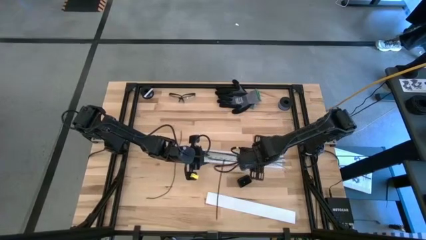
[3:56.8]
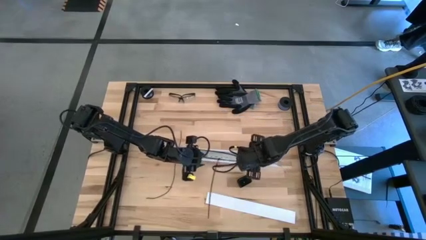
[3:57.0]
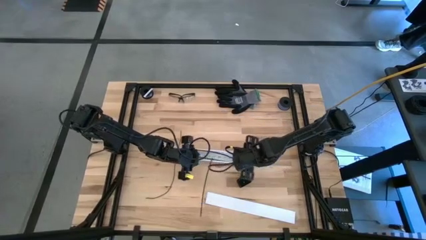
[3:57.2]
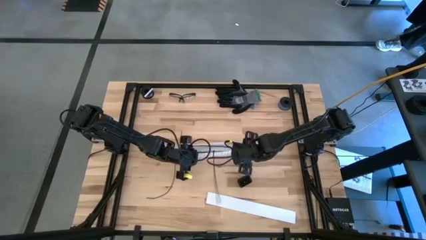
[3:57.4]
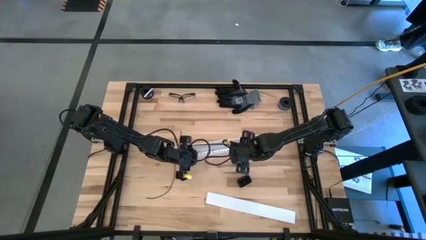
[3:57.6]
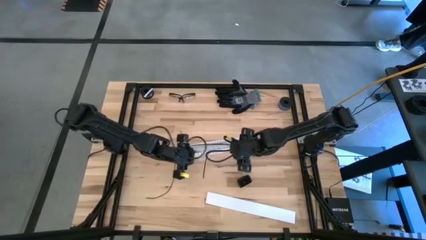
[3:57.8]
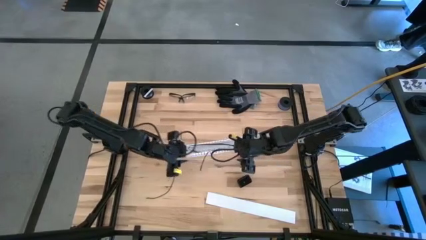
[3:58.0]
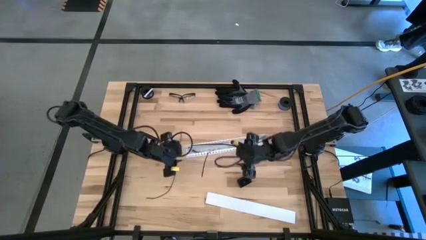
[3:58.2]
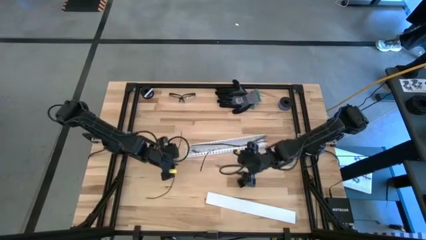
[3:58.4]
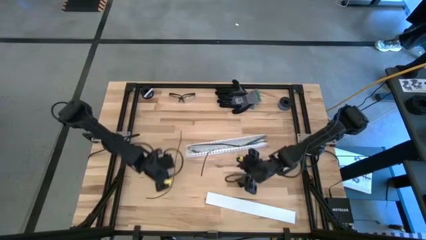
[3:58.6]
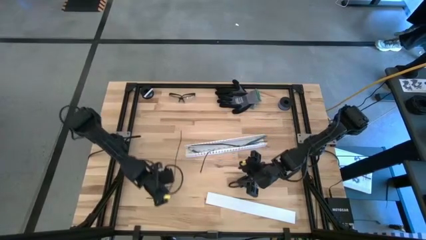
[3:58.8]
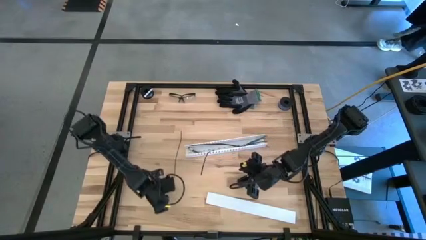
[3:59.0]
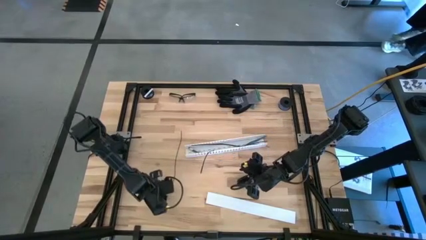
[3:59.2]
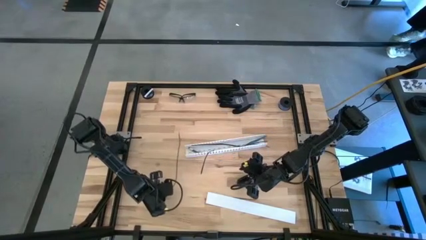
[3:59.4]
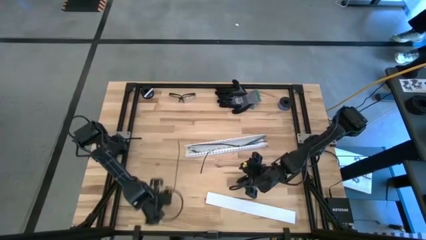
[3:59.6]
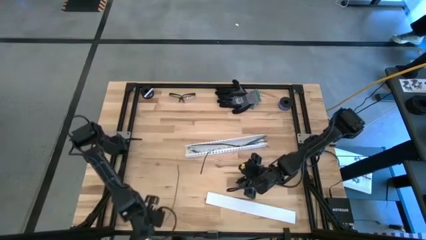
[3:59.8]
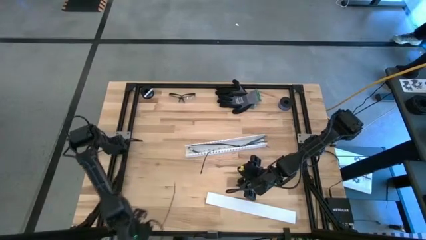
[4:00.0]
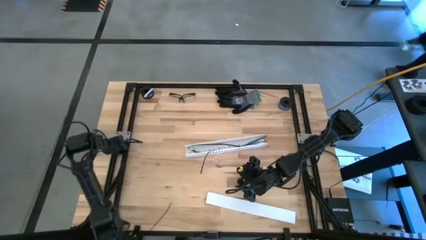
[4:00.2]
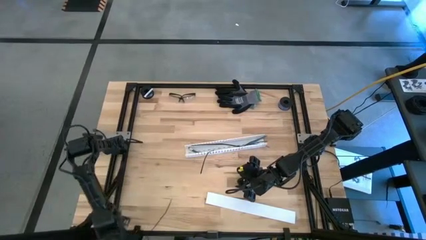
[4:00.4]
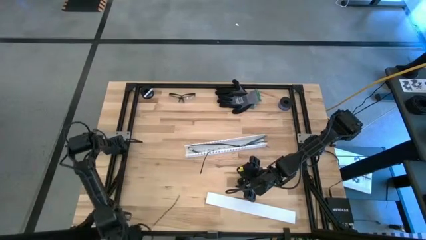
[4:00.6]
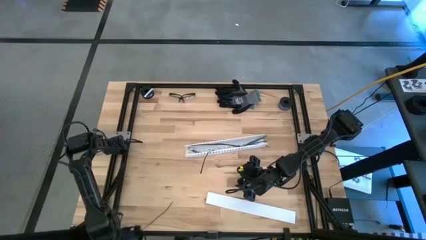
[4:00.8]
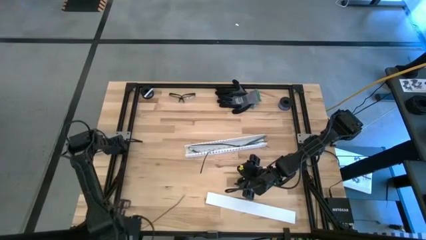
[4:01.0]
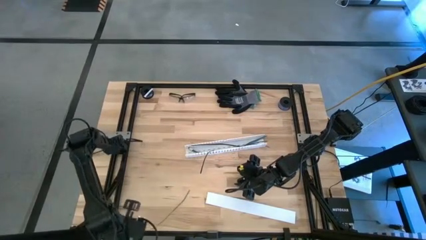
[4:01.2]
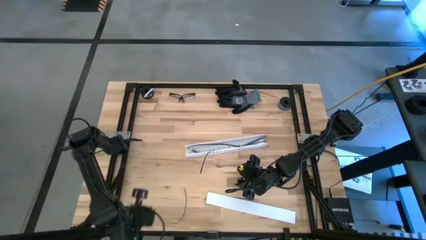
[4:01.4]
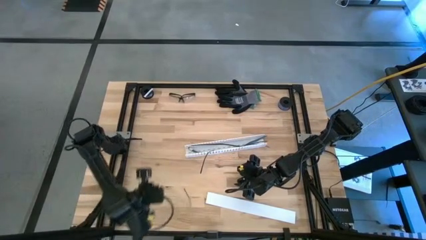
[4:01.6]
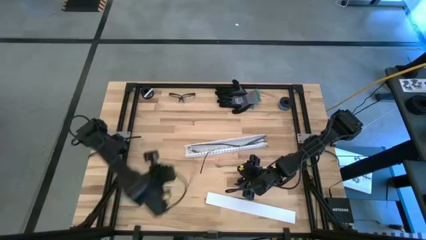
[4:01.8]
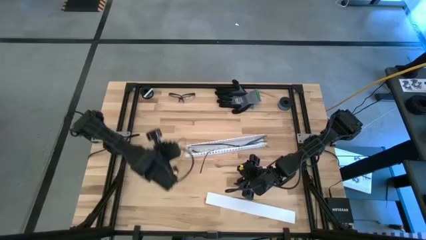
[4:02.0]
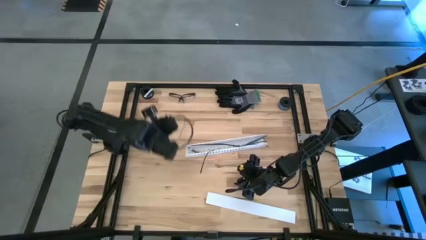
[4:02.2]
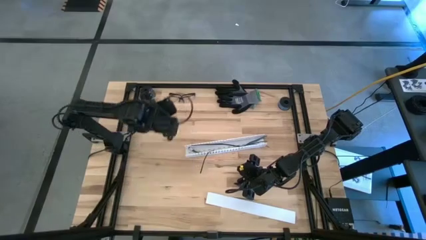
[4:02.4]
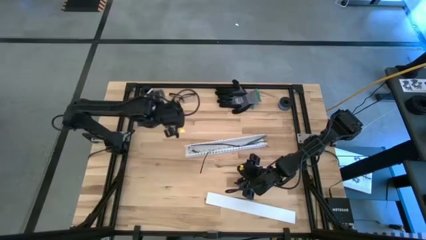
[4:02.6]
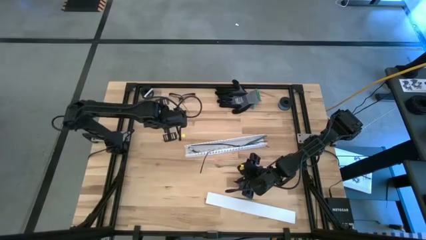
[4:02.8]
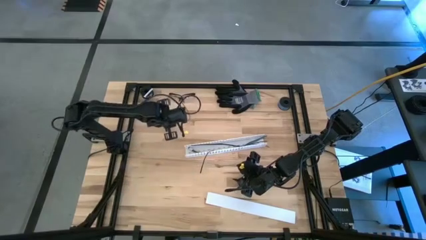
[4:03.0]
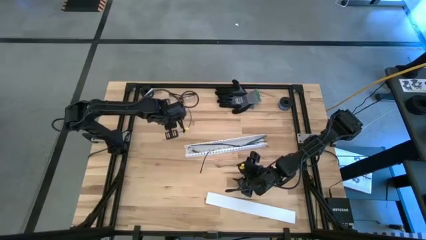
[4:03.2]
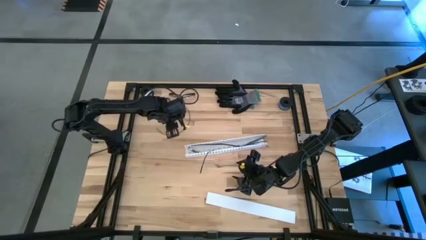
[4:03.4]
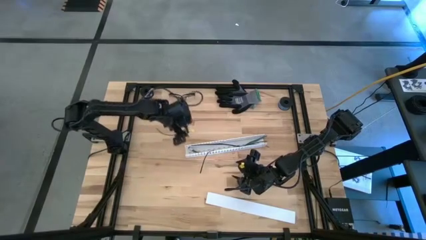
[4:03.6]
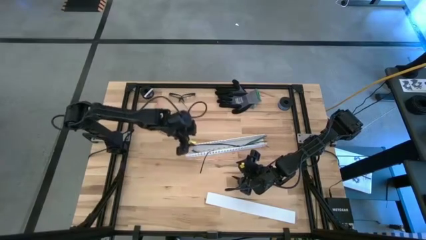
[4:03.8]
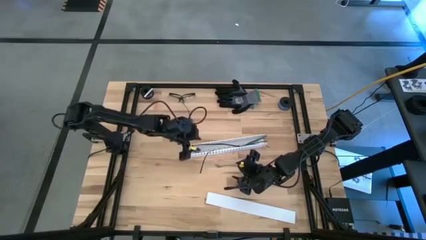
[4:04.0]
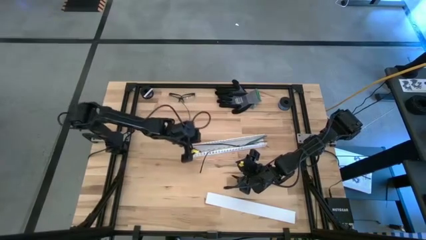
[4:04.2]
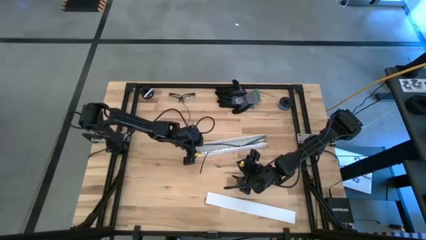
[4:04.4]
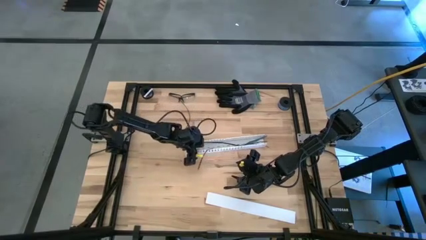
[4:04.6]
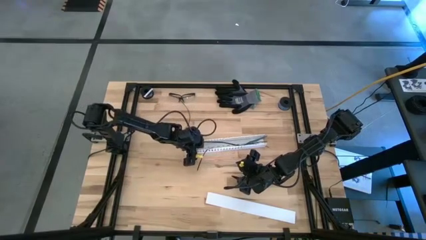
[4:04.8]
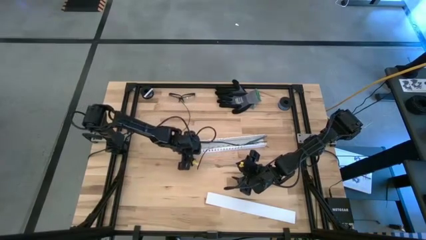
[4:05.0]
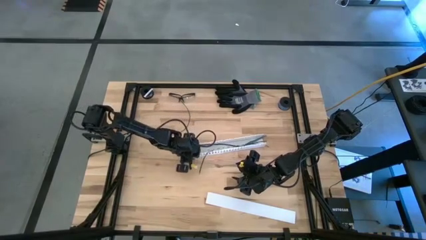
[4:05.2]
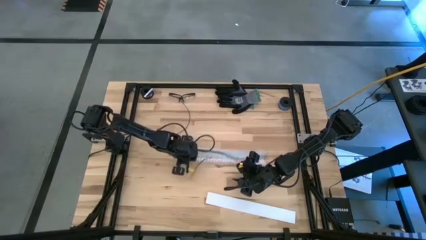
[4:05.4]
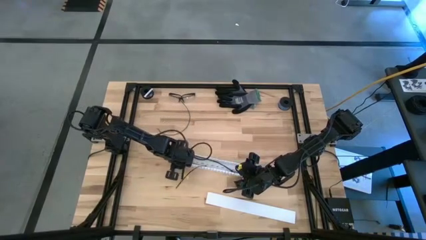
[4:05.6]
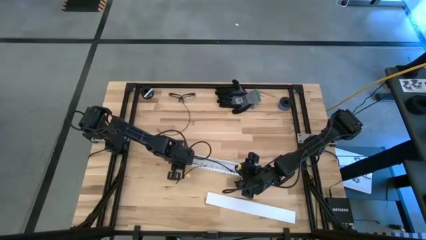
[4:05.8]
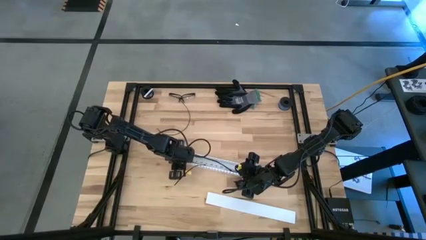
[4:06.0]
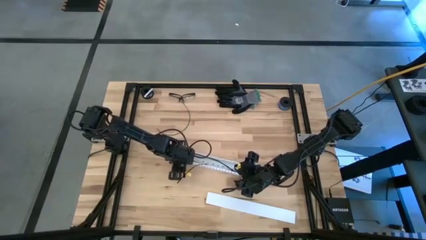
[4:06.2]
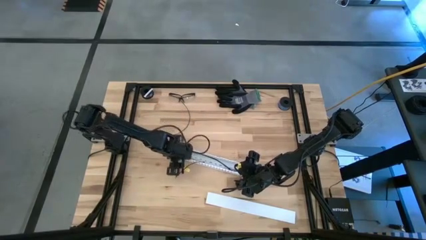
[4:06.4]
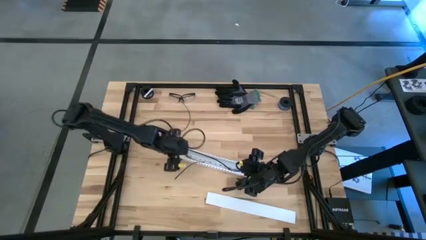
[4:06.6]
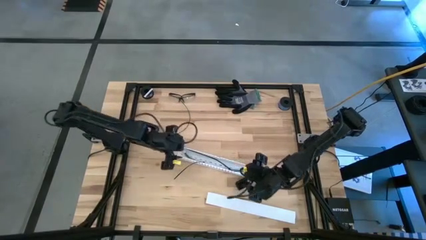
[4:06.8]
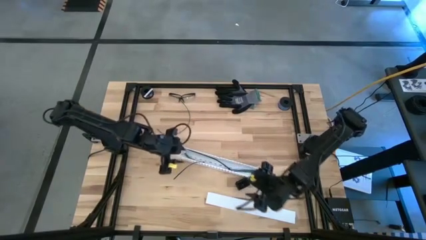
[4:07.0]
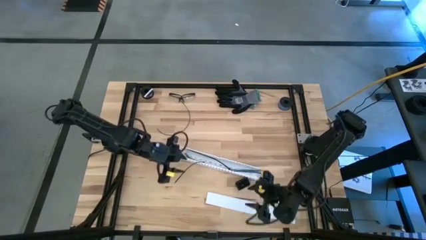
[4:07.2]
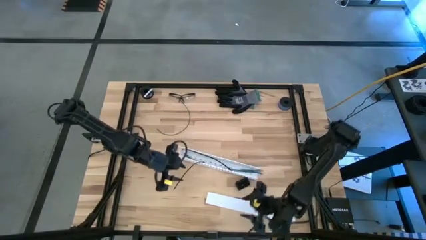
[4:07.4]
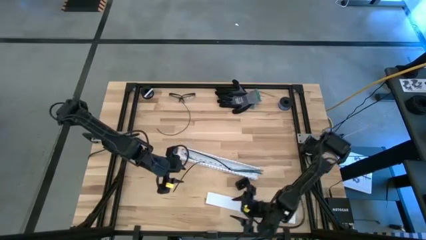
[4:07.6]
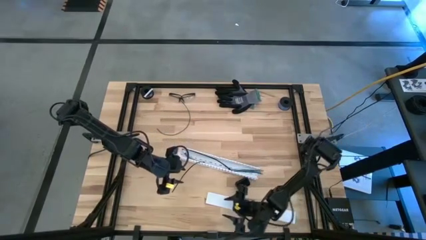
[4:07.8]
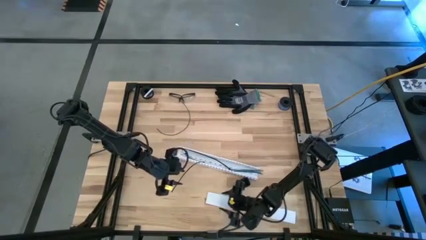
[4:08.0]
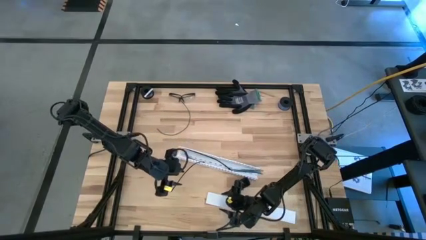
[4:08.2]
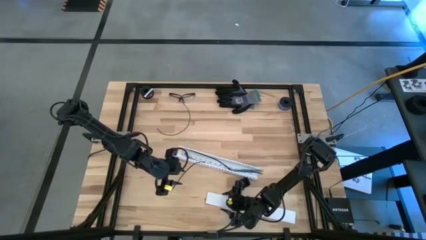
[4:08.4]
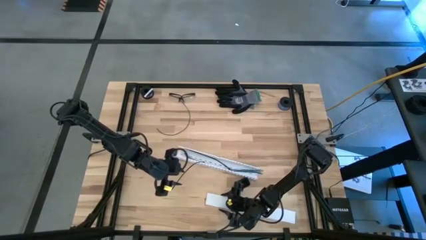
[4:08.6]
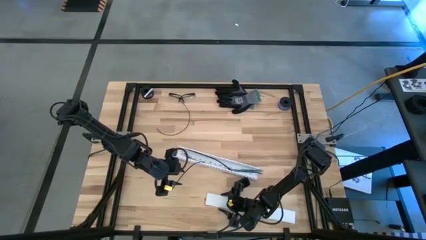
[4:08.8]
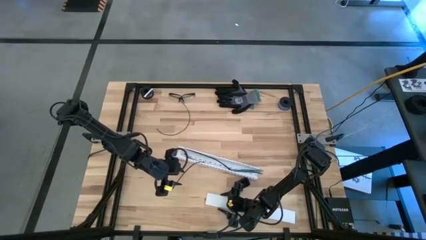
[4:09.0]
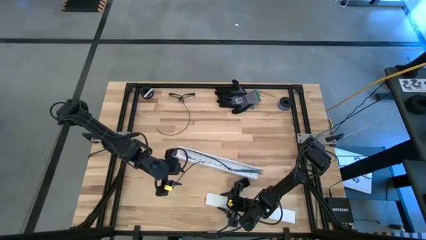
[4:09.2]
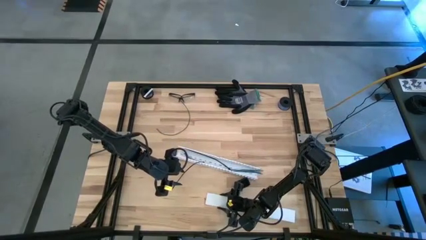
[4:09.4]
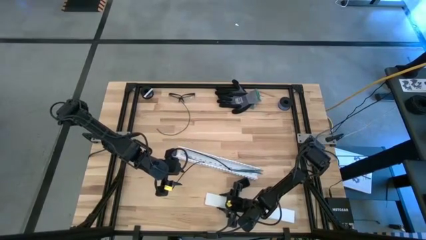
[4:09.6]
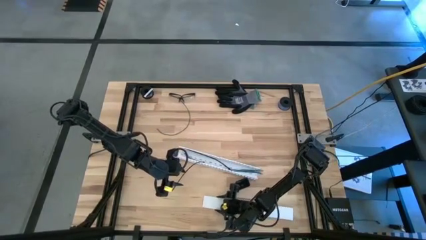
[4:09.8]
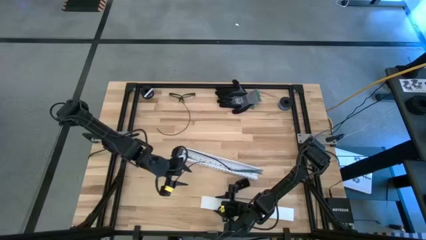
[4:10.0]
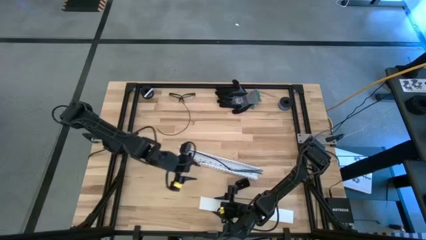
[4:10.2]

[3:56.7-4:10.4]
Task: Ziptie cables
Close the white cable duct lid

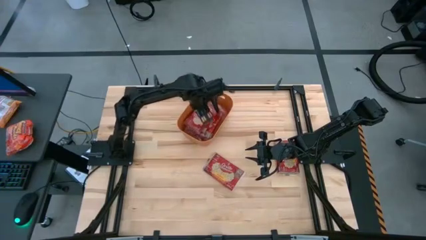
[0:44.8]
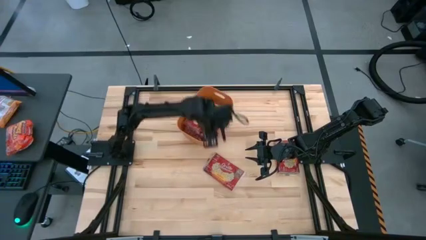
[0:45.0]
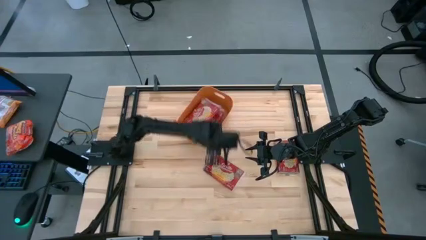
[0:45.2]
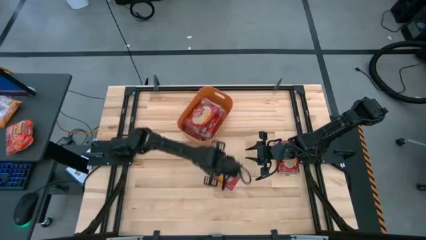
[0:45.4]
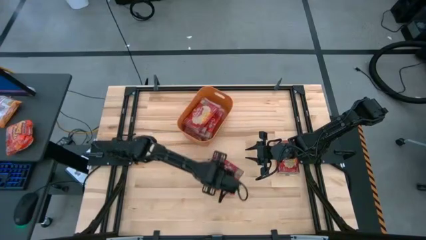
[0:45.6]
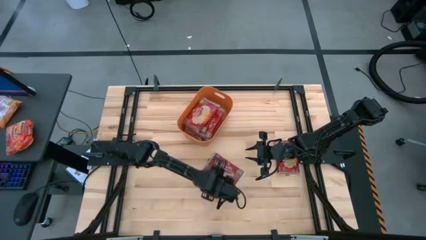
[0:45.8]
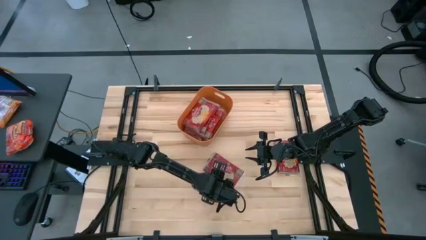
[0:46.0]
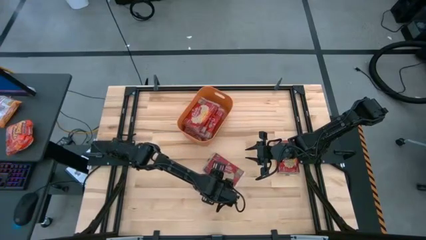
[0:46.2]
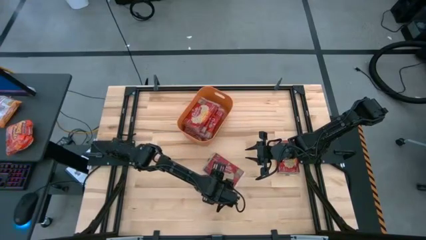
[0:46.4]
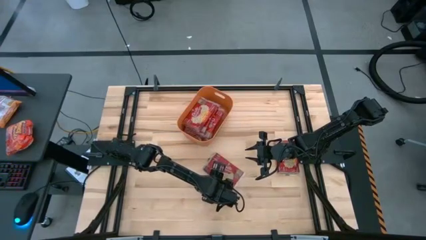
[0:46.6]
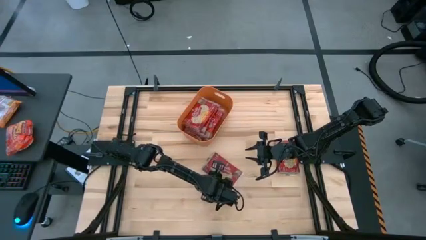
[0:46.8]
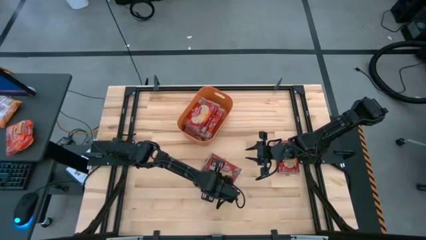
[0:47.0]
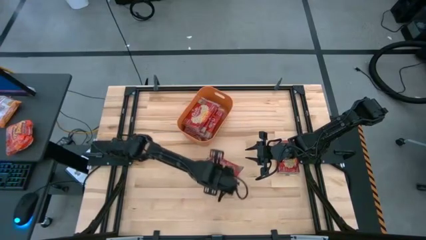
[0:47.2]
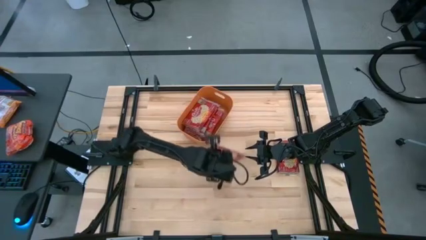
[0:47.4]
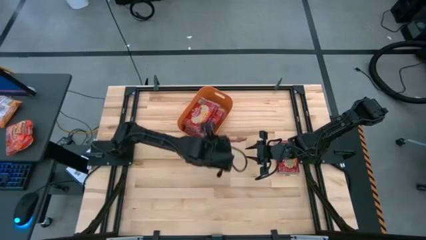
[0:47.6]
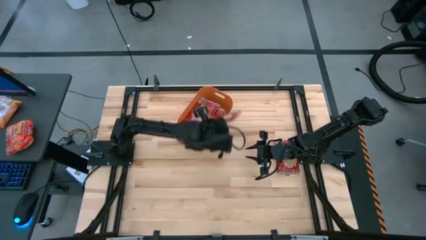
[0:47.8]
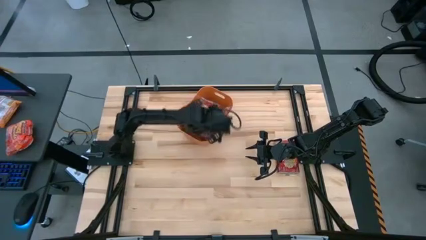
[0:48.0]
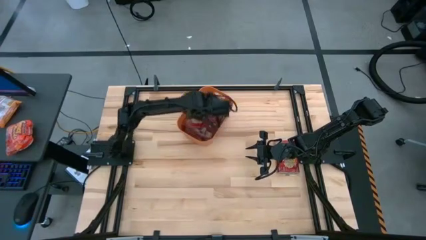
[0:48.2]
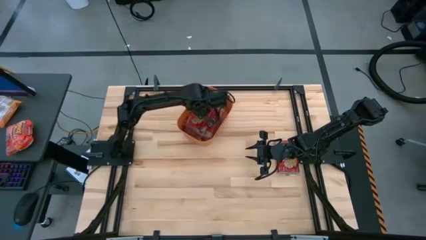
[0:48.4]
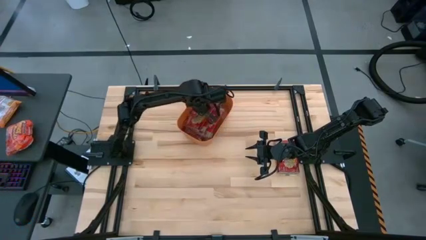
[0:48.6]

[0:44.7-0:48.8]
Task: Sort popcorn bags into baskets
Put the red popcorn bag into the orange bin
